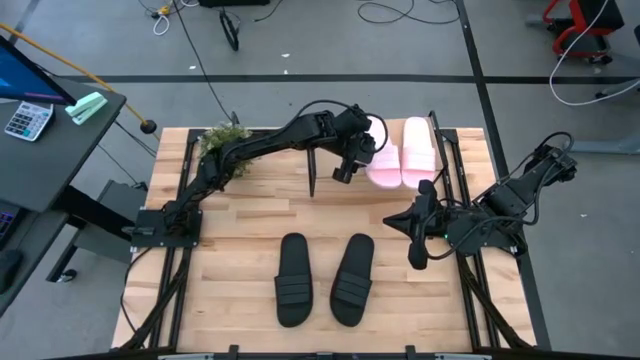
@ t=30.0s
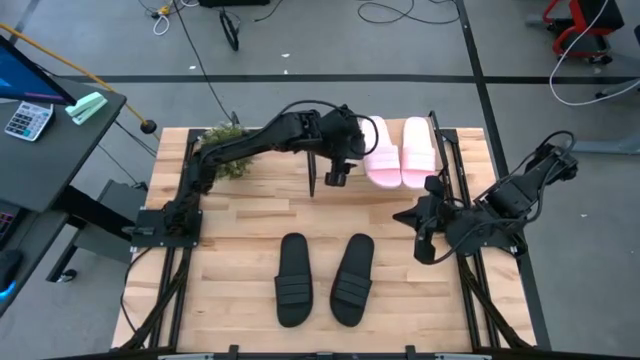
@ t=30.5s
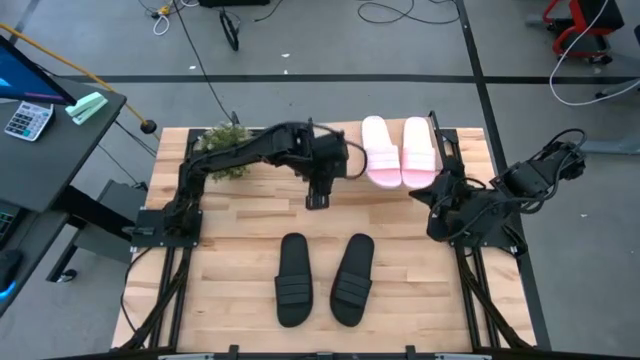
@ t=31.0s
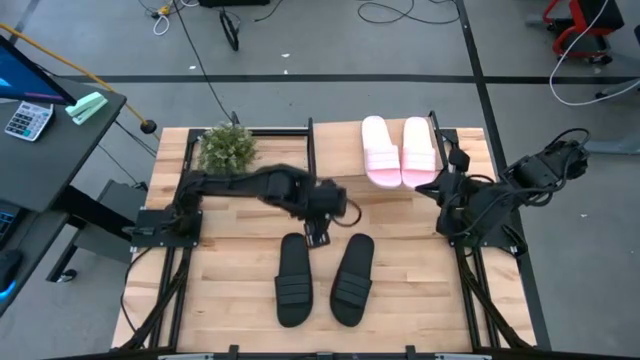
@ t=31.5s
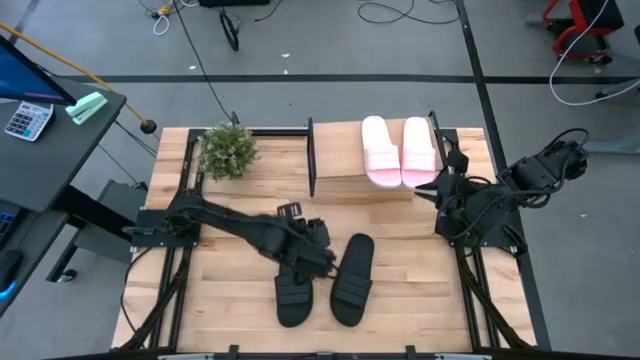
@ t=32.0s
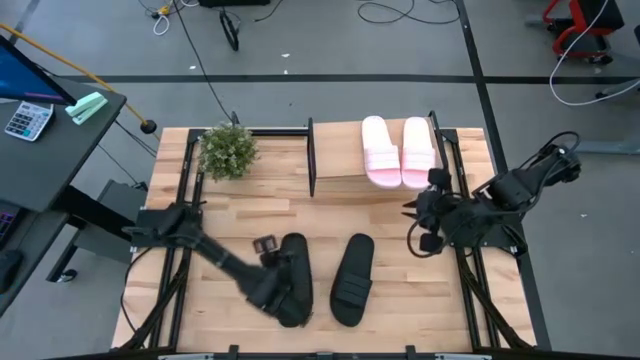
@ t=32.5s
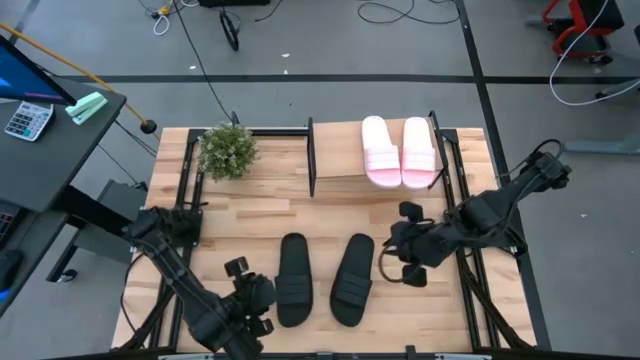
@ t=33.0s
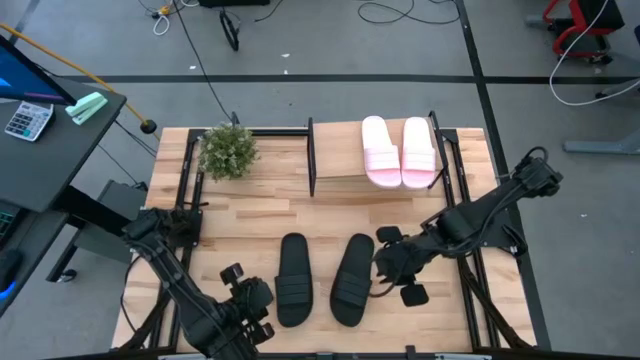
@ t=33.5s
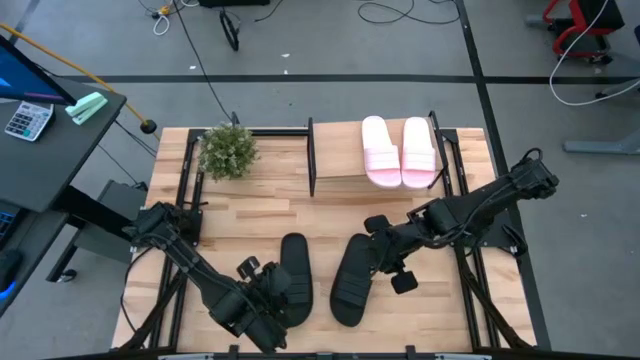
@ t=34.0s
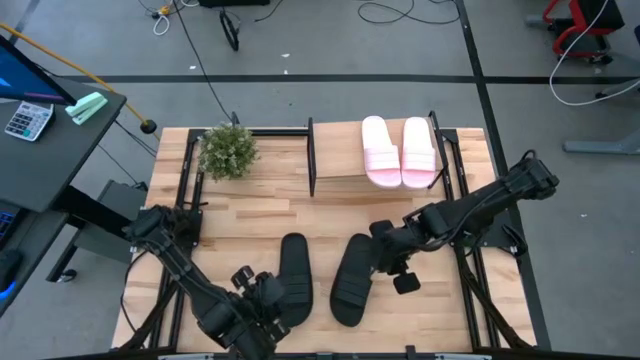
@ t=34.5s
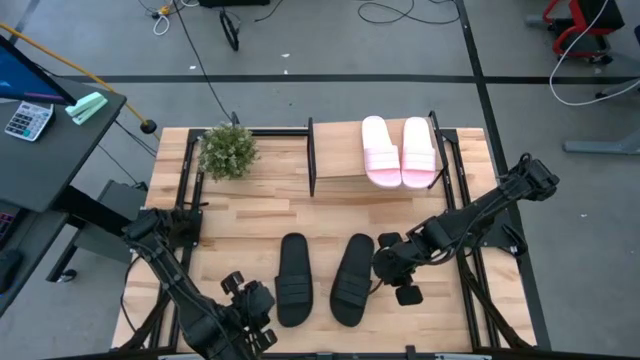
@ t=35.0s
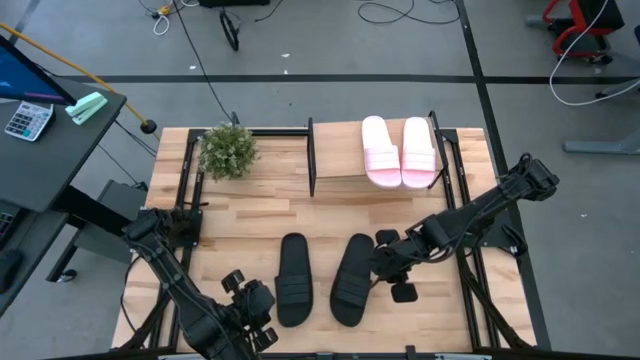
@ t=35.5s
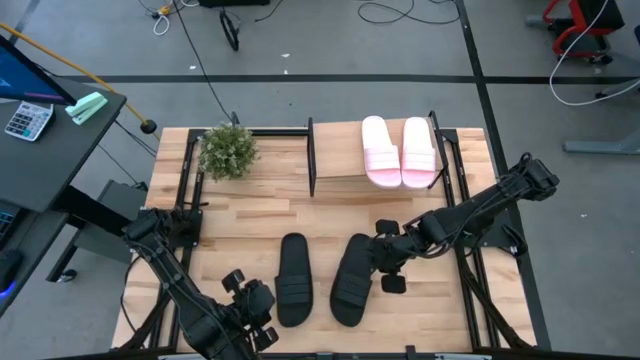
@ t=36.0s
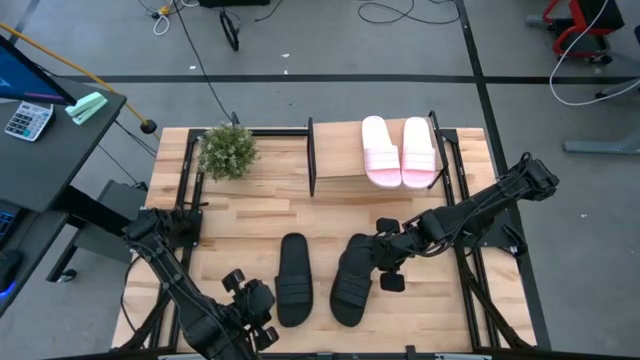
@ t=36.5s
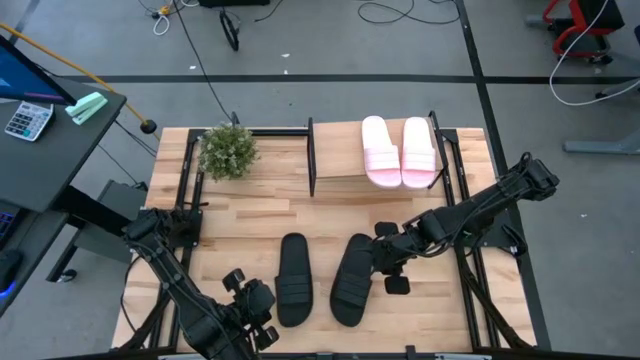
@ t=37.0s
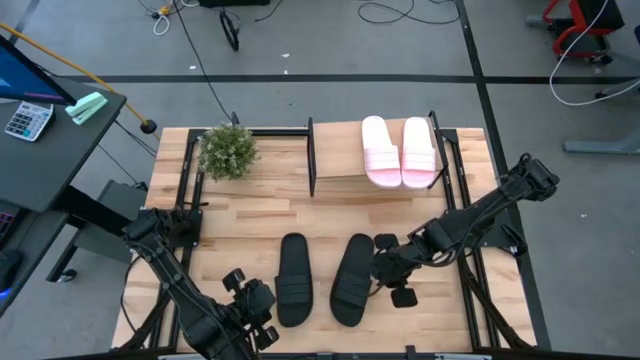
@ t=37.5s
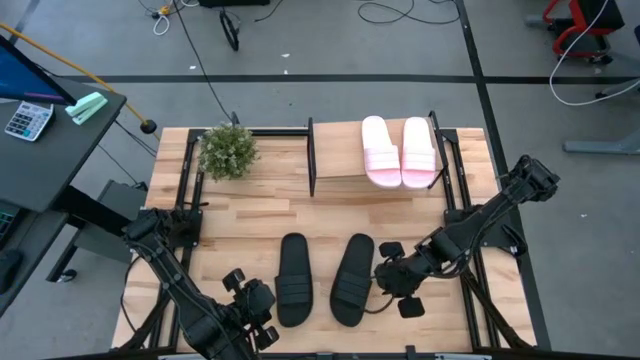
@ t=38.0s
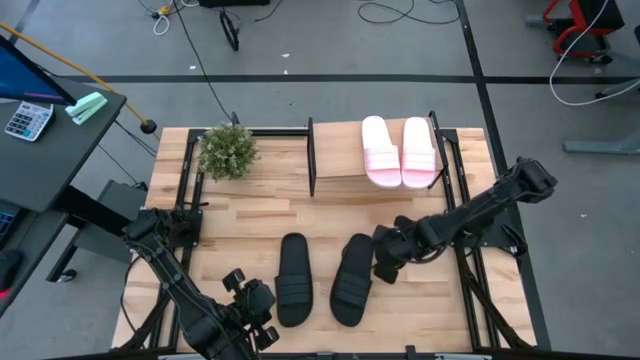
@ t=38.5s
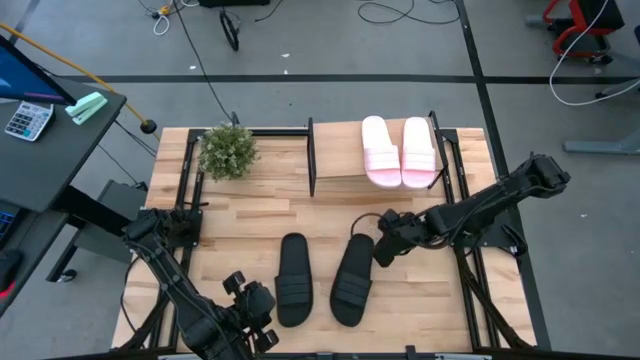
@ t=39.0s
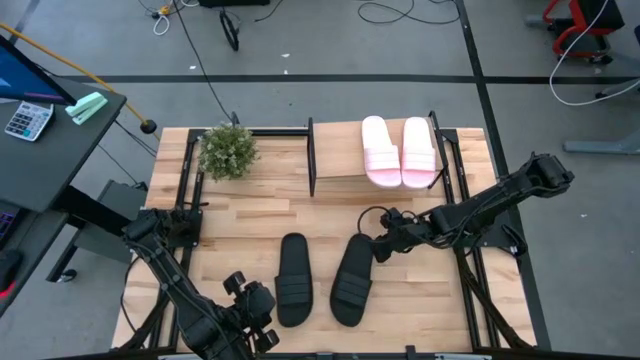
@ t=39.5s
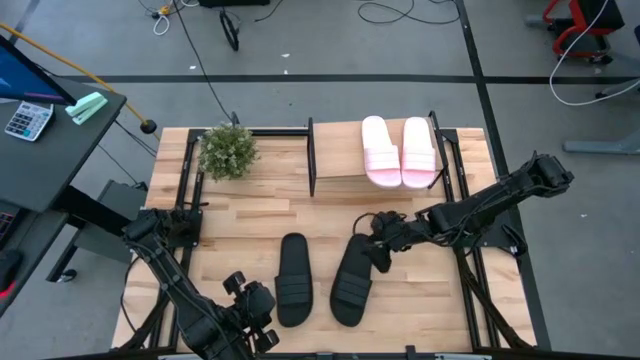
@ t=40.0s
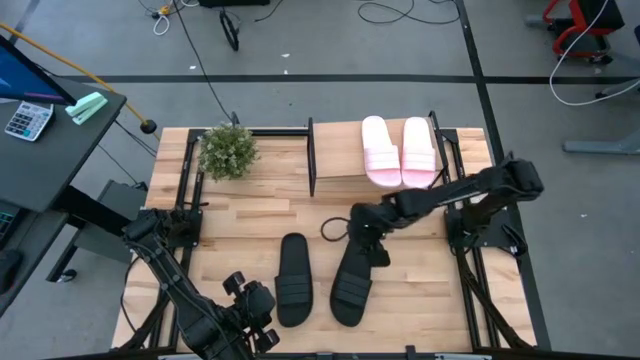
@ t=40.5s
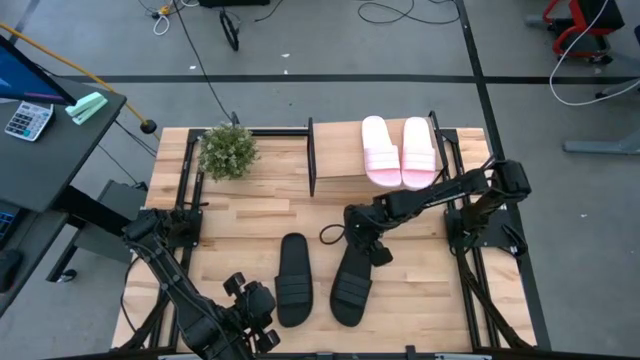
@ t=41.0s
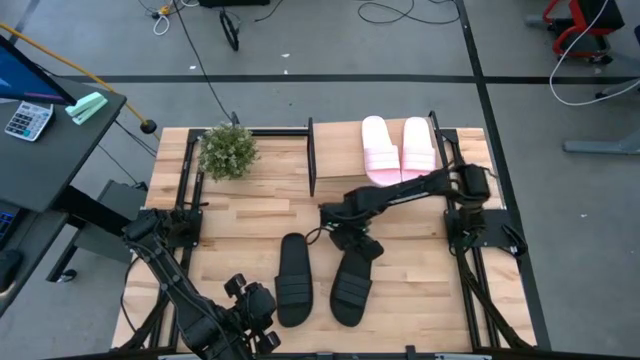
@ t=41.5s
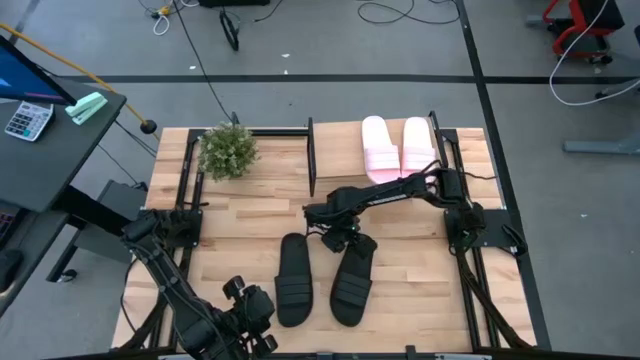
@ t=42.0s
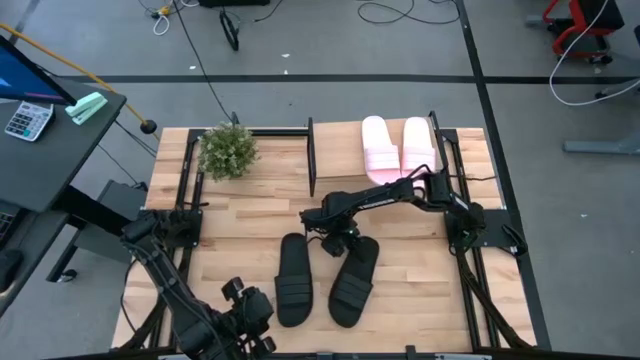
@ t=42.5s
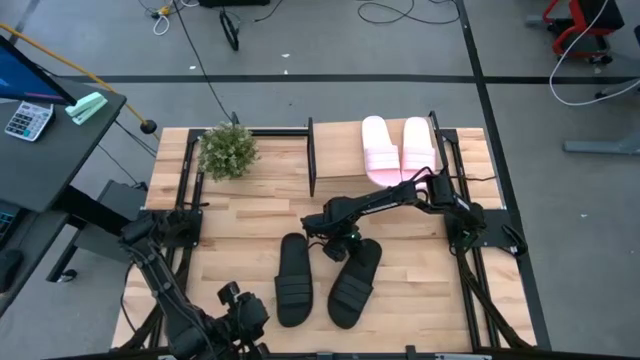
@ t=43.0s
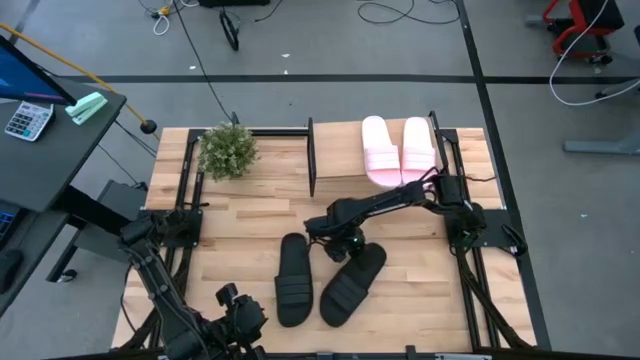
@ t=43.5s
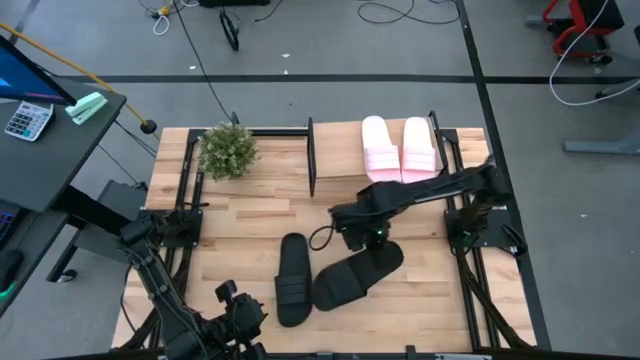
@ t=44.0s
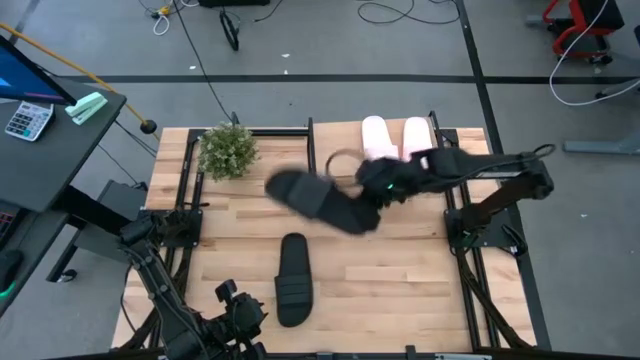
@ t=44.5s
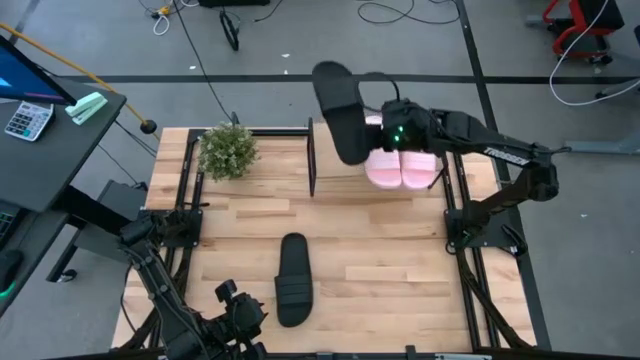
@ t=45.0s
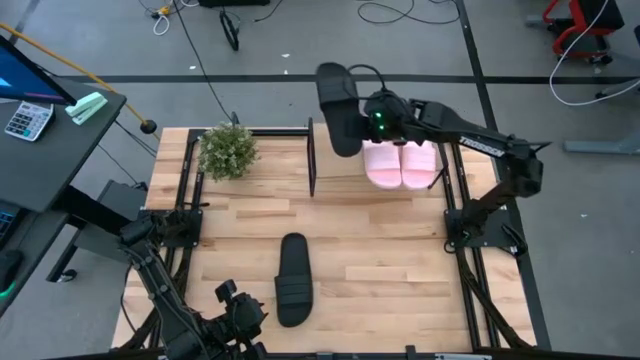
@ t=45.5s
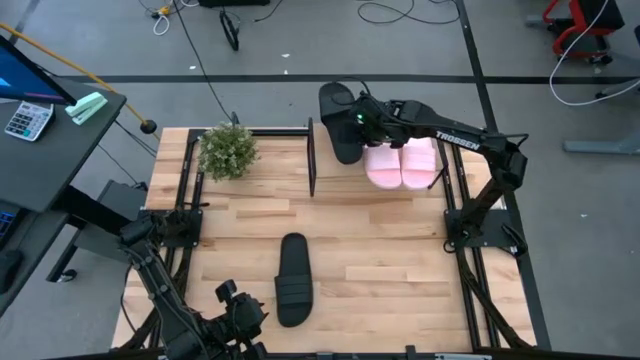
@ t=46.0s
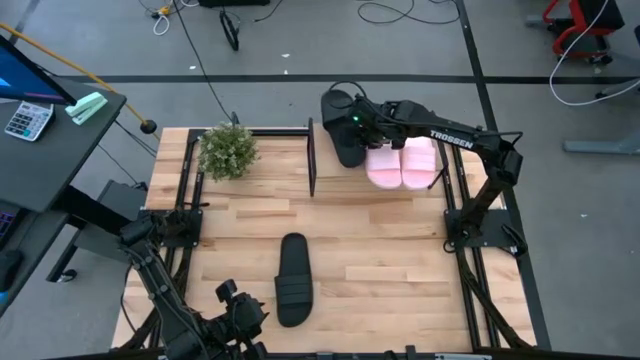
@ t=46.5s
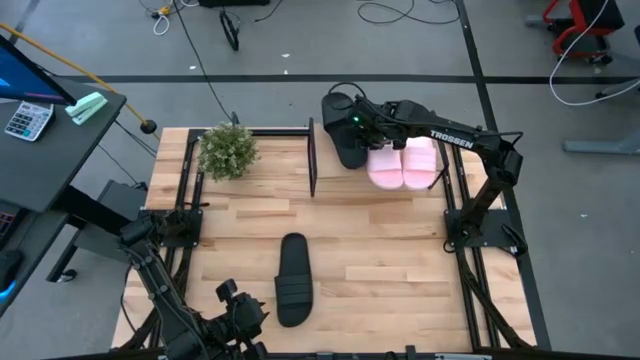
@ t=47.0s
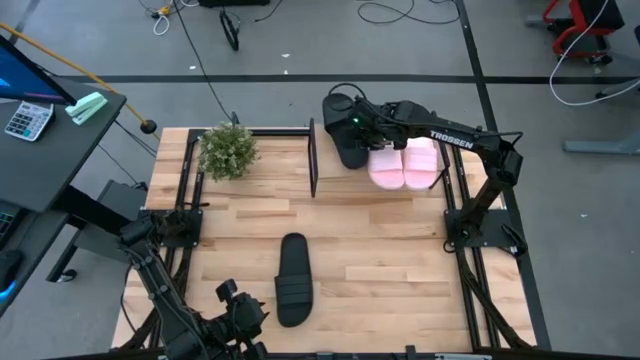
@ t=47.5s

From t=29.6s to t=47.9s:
Task: Pick and place slides into the shelf
Put the right black slipper on the shelf
